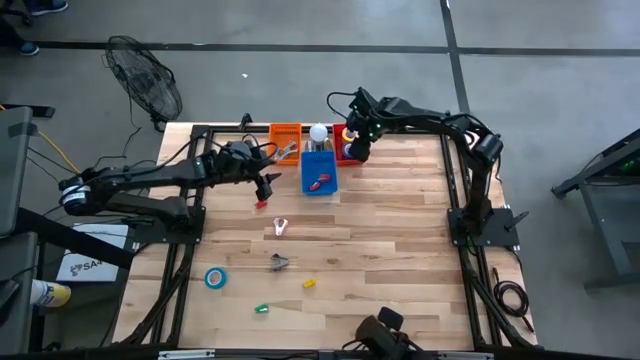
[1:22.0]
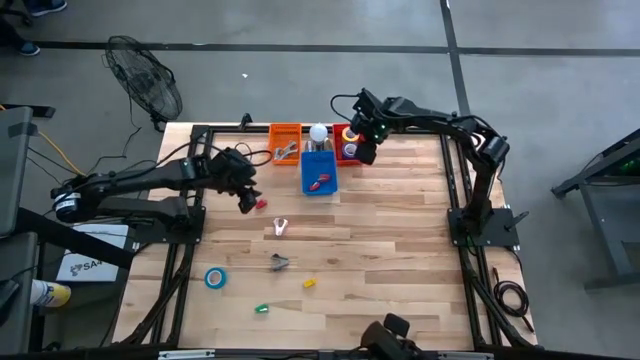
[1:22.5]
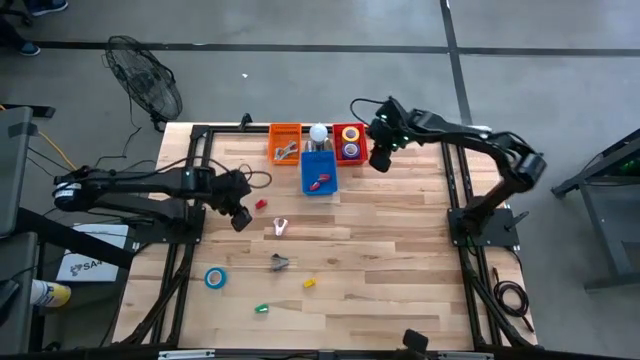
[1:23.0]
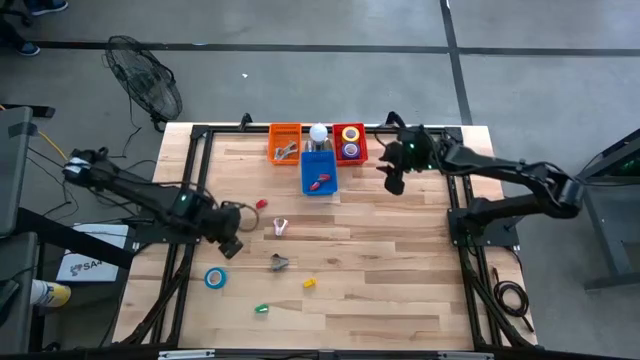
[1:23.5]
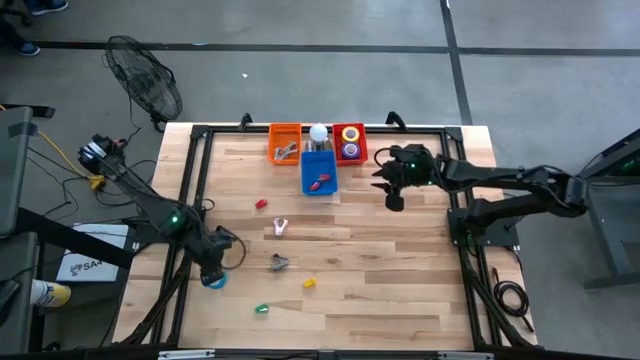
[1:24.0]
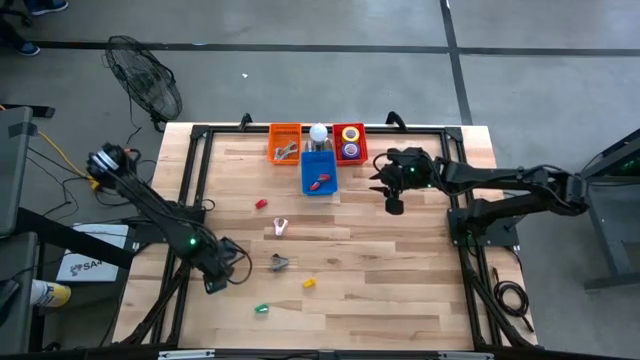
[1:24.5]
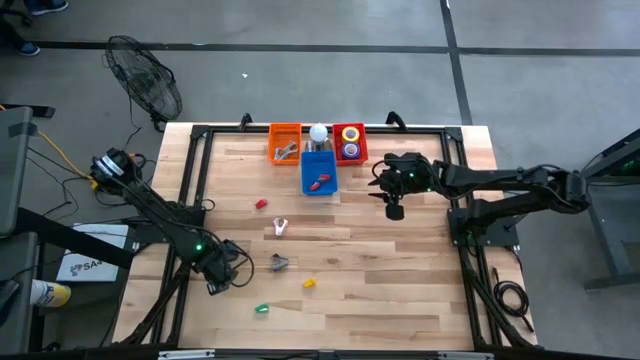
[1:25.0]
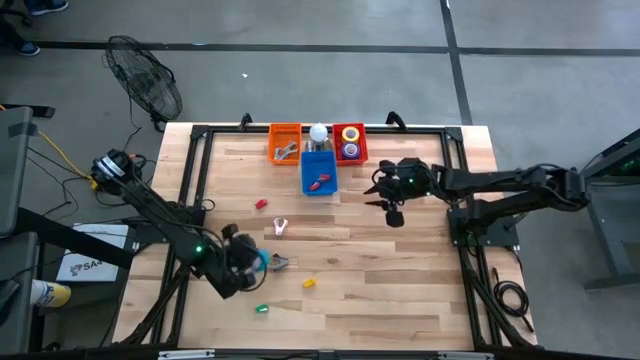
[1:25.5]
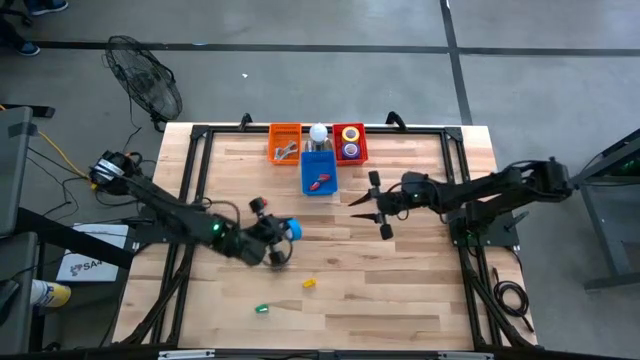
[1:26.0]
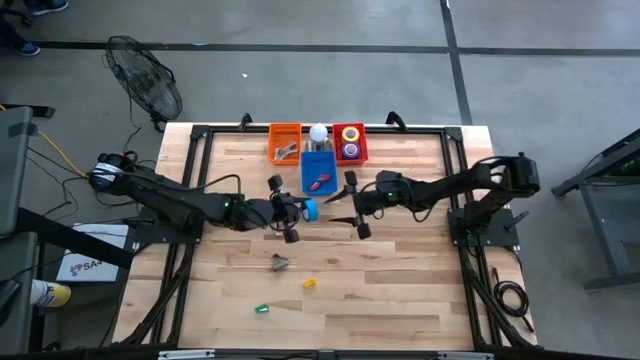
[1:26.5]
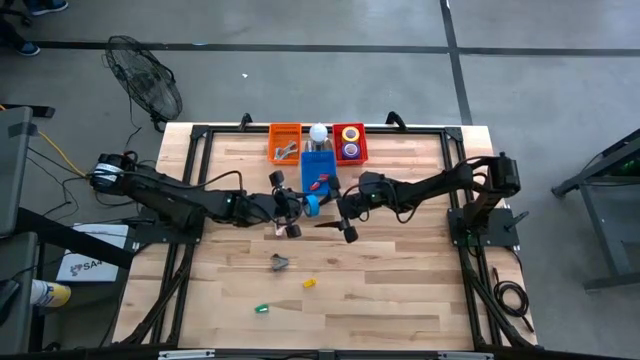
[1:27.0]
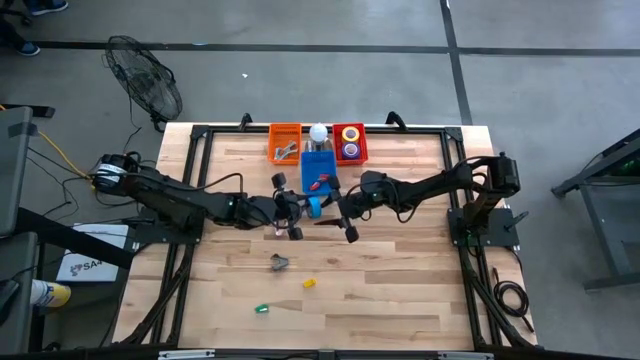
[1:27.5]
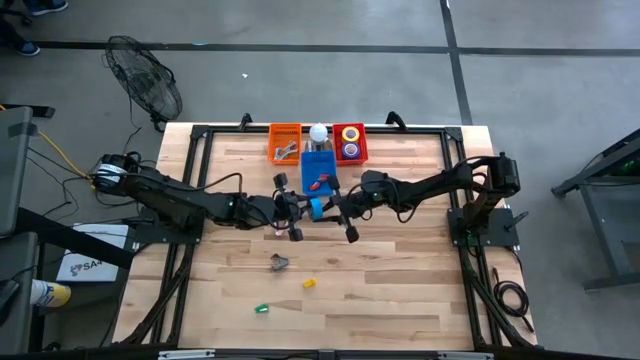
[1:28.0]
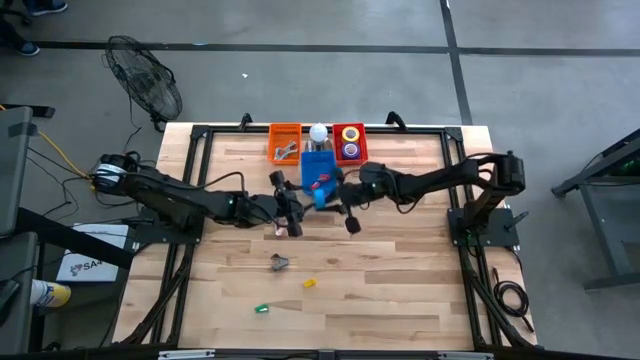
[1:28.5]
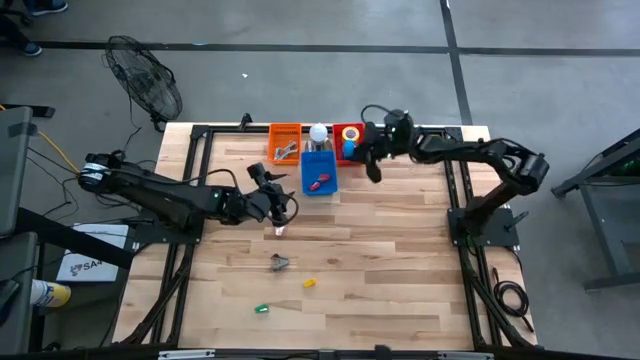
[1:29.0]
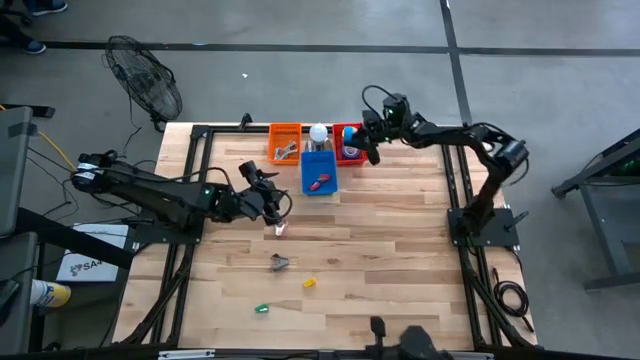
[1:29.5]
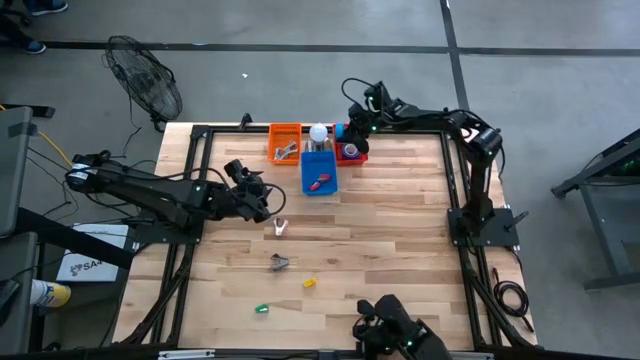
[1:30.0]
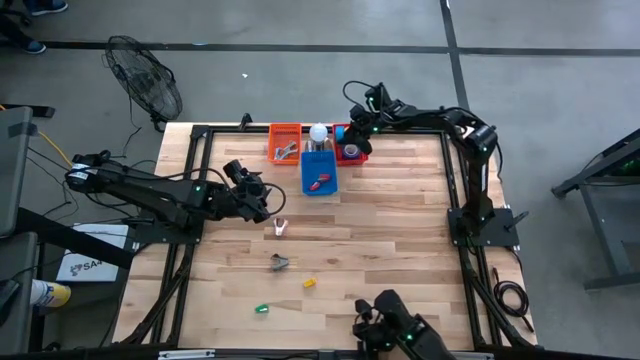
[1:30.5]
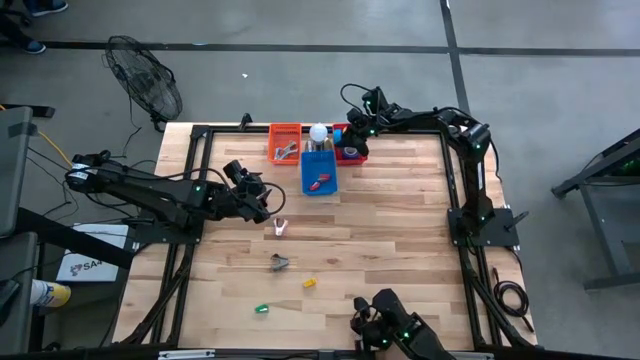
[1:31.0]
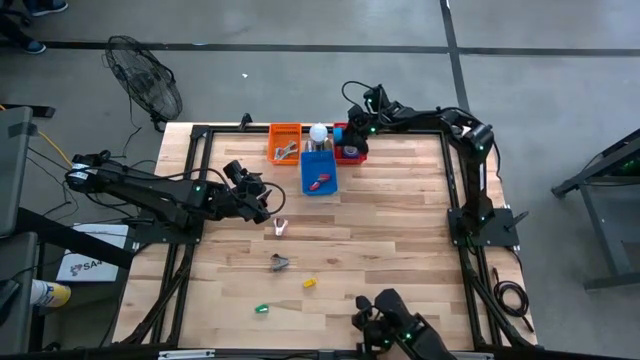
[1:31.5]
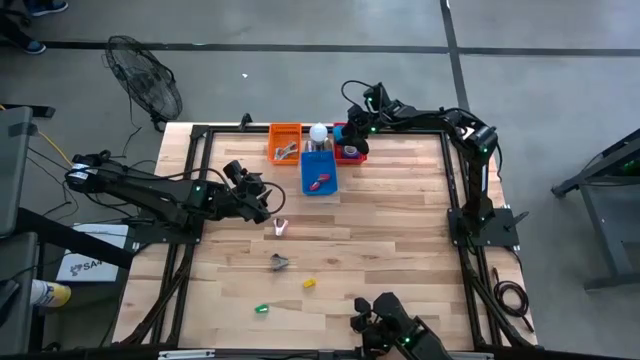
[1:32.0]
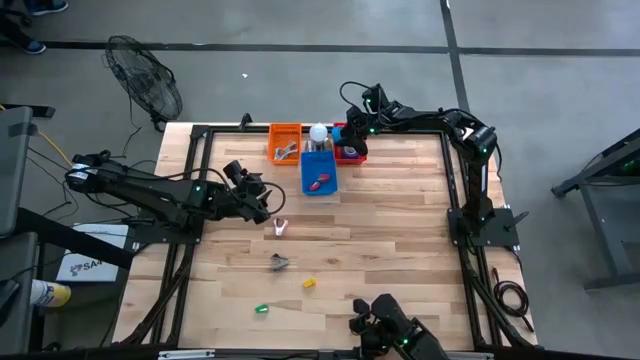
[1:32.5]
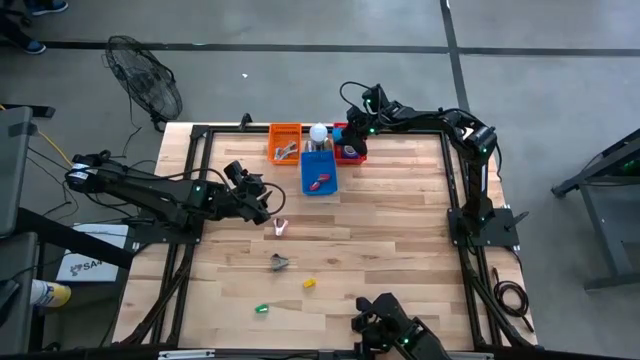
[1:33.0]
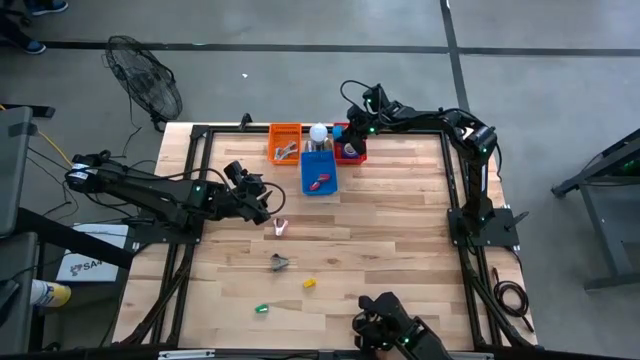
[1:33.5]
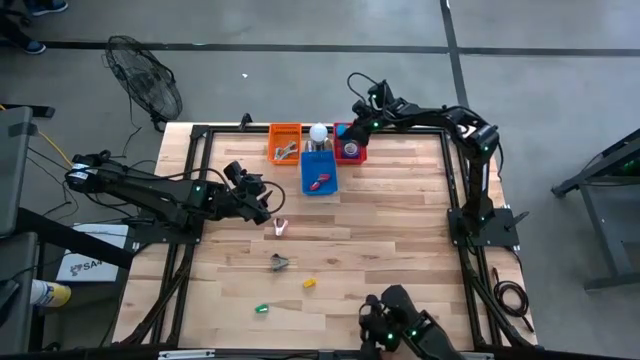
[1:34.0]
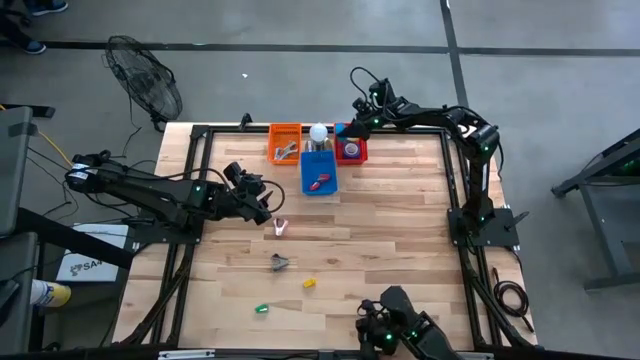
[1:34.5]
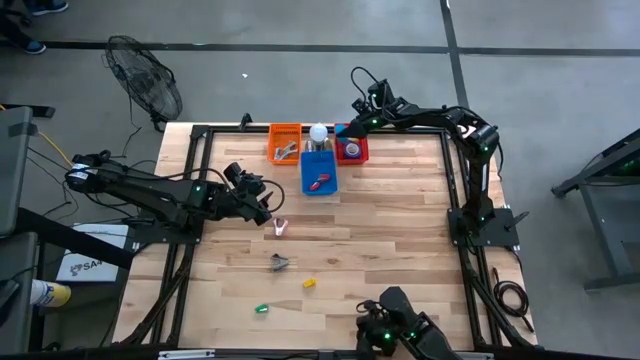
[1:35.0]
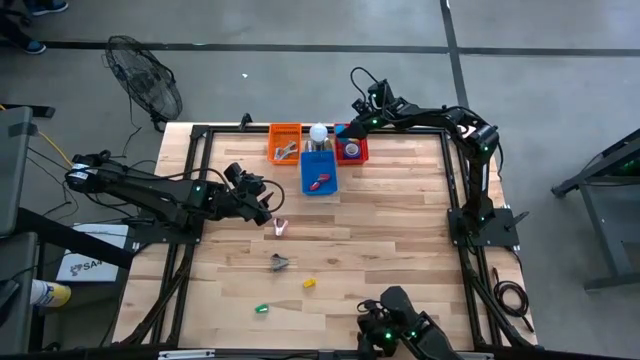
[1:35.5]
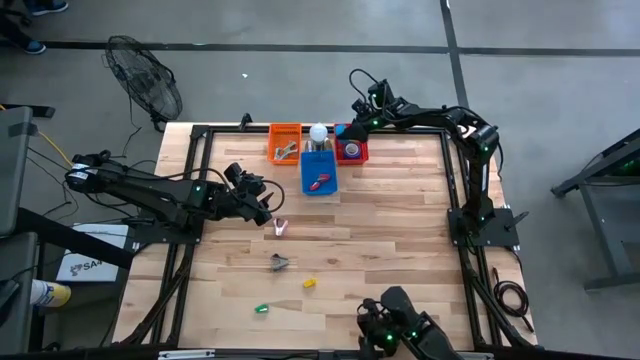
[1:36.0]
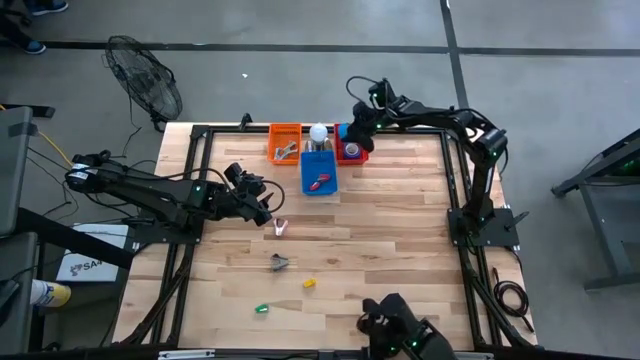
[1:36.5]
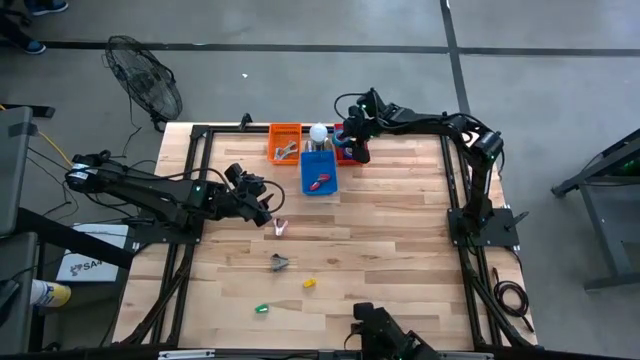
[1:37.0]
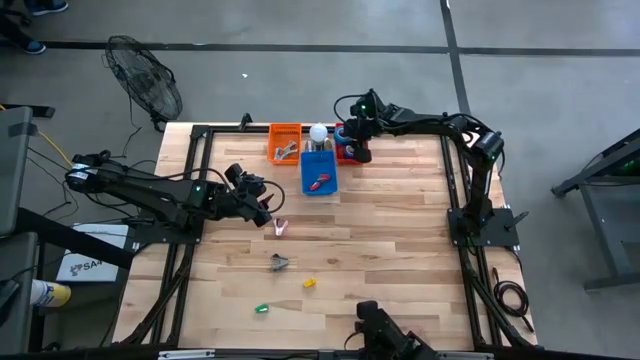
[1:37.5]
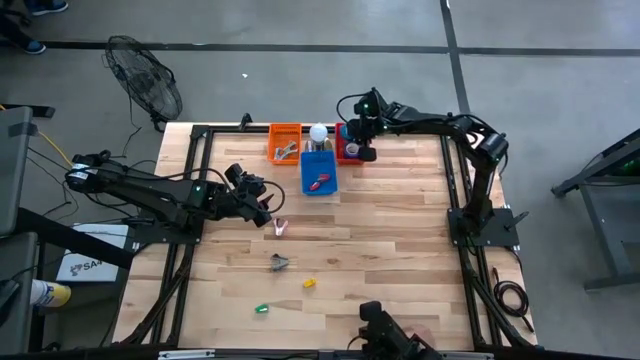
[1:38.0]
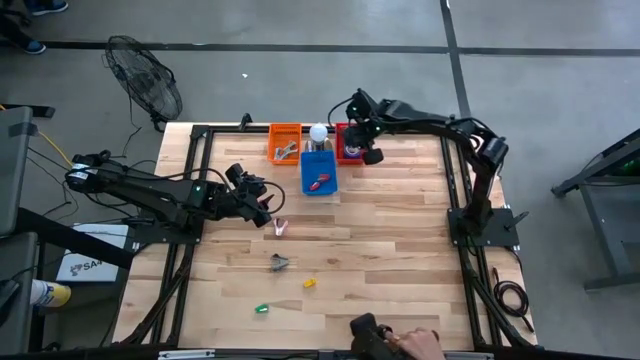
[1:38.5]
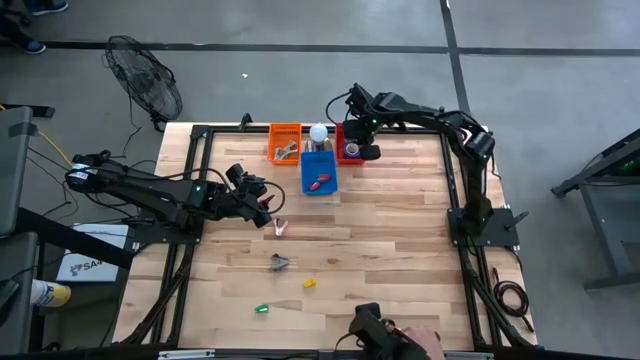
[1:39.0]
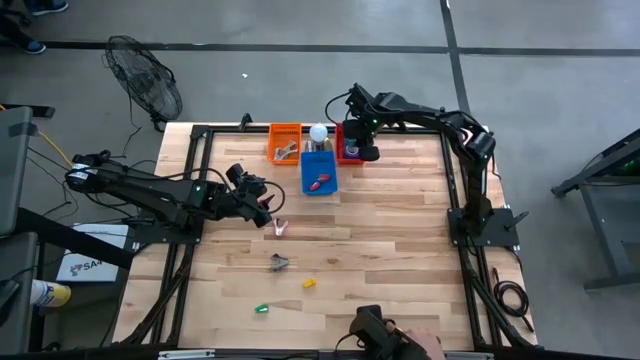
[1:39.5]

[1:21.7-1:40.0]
Task: Pick and place Stapler, Stapler remover, tape
Put the light blue tape into the red basket

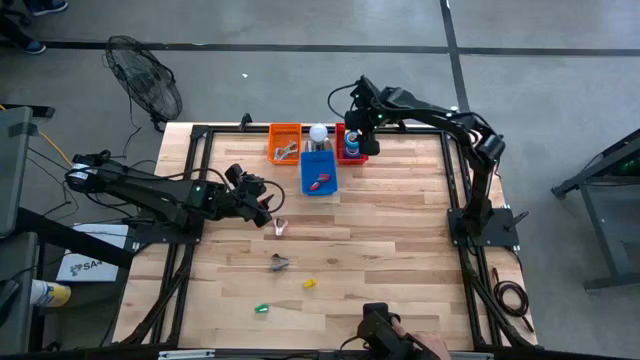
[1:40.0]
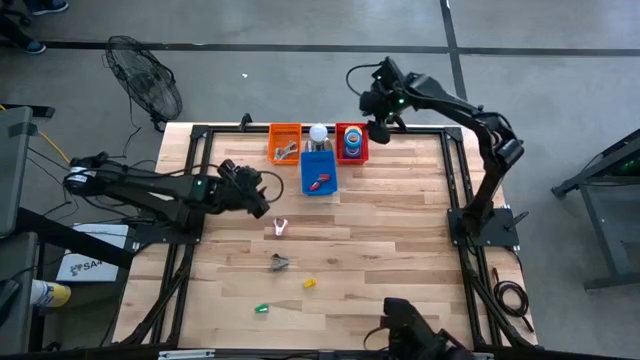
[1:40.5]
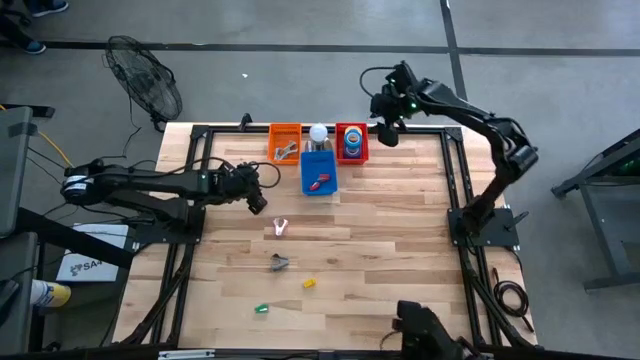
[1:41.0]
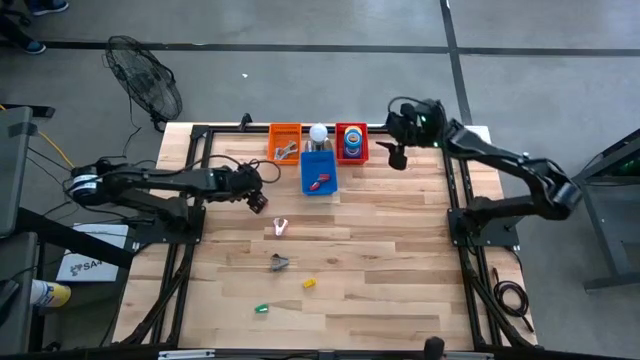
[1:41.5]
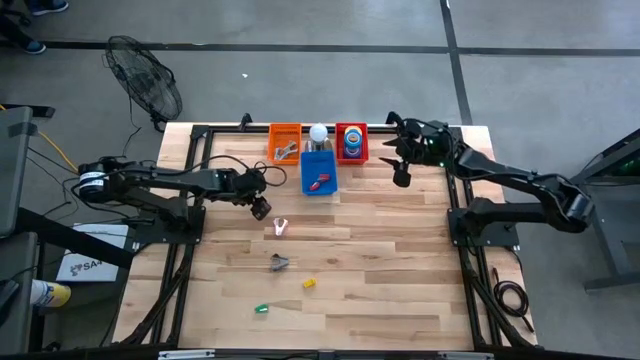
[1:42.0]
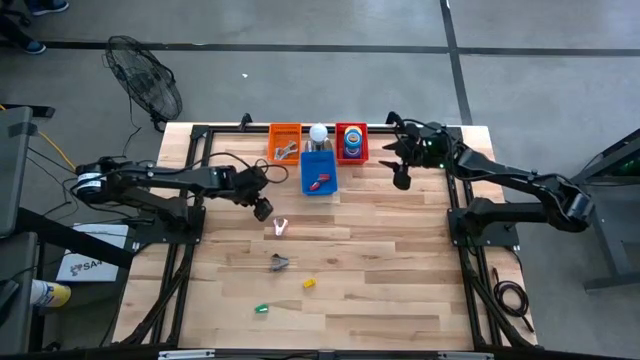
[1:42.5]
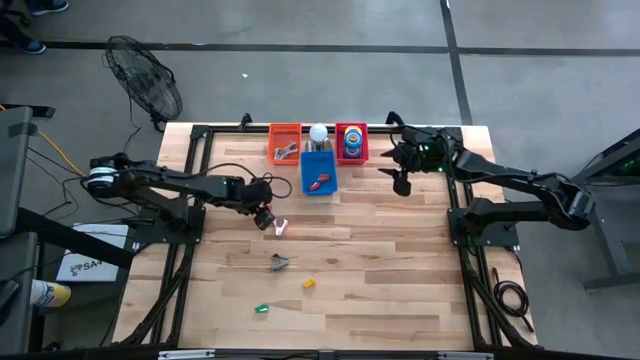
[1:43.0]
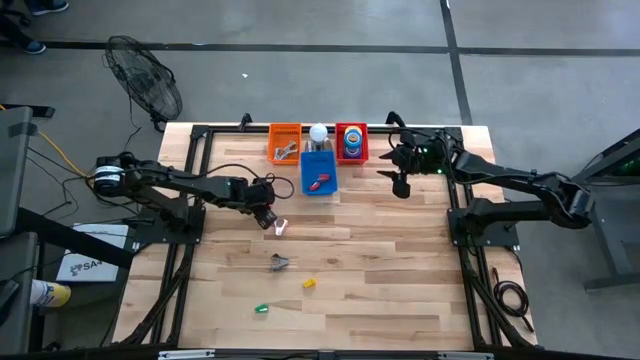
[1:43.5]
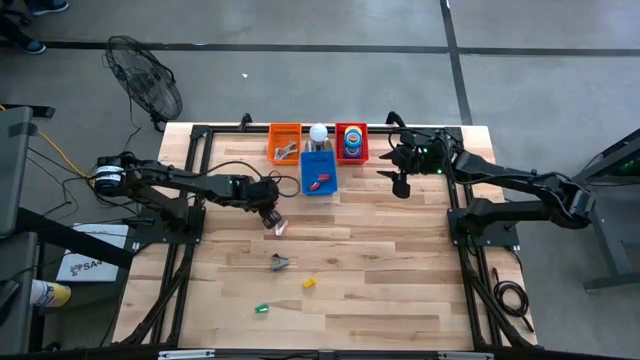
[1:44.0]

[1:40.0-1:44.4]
Put the red stapler into the blue basket
